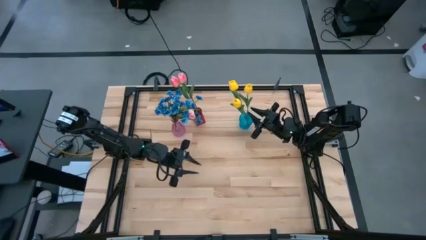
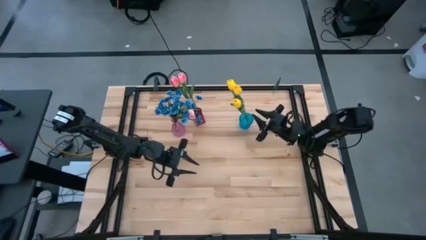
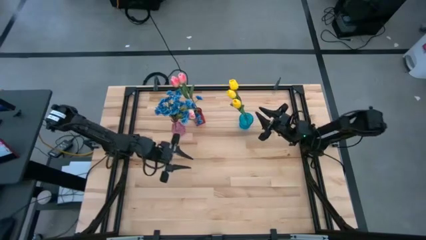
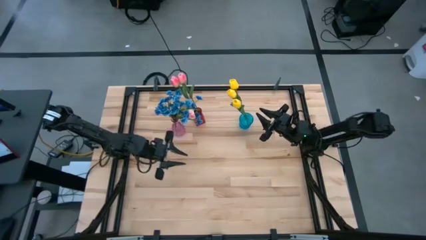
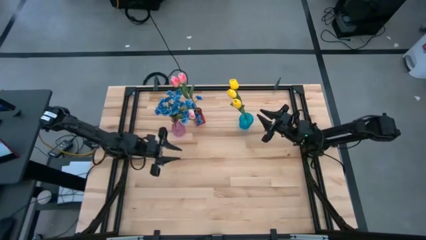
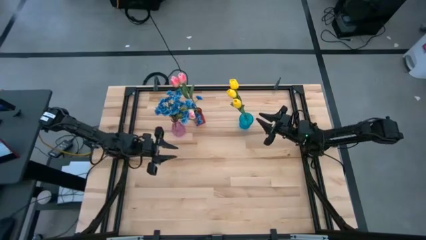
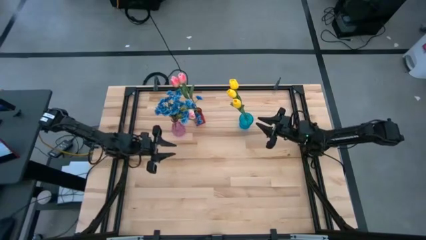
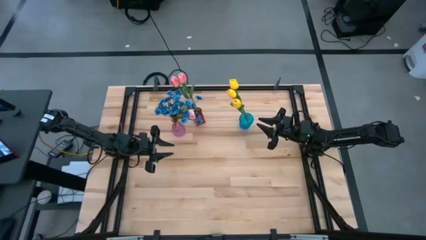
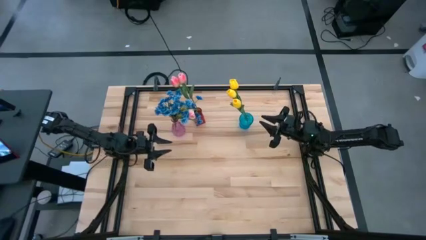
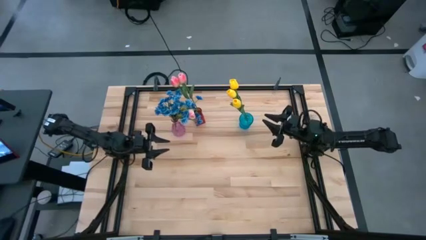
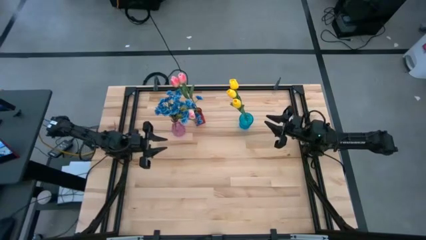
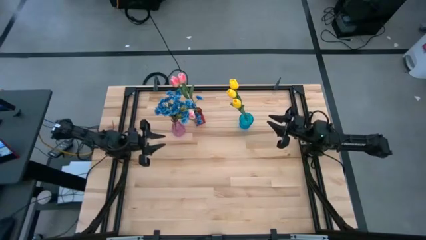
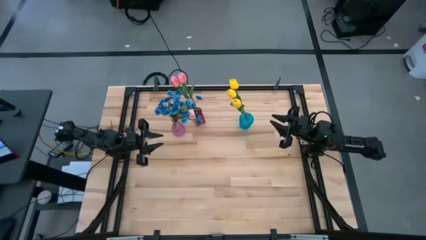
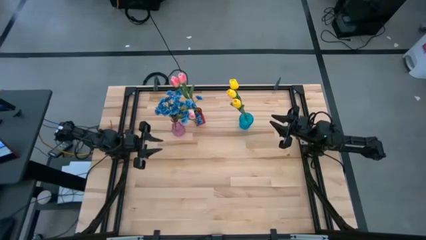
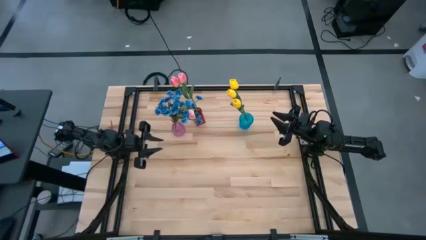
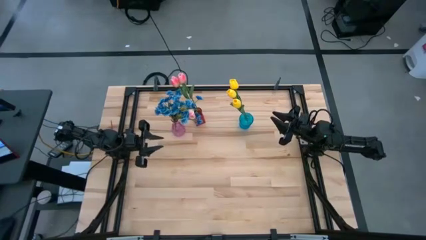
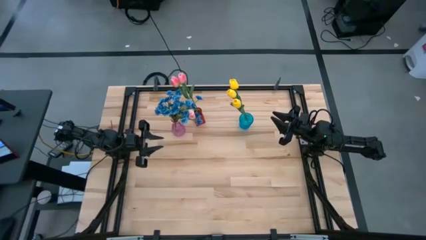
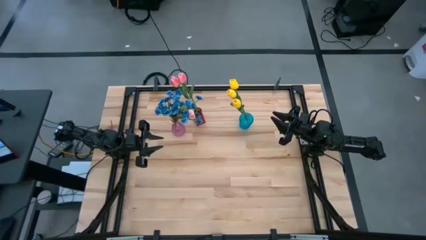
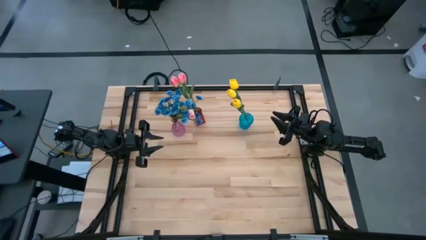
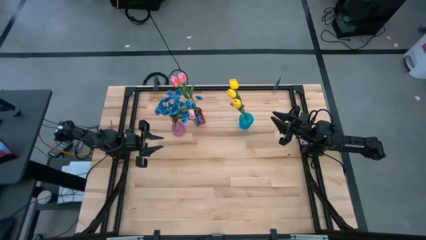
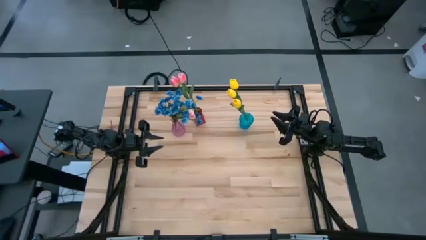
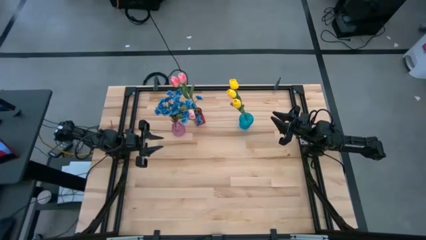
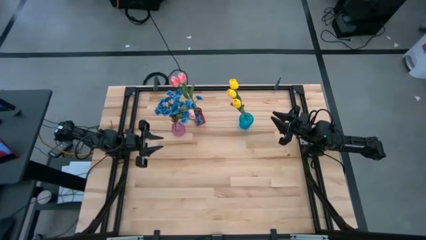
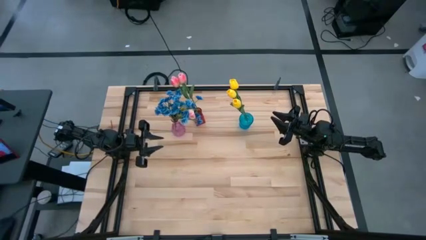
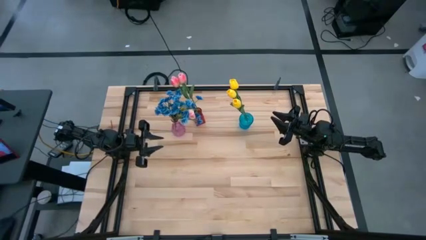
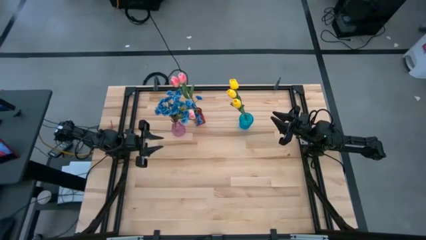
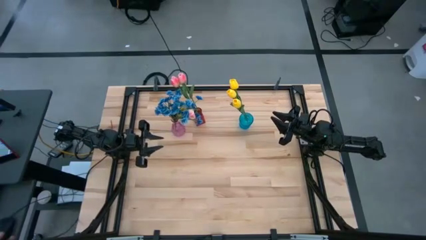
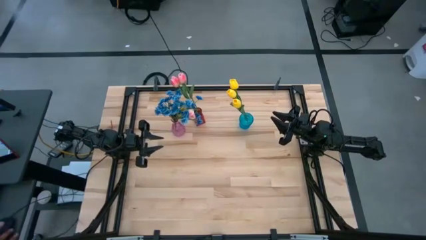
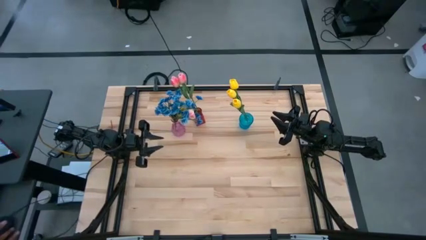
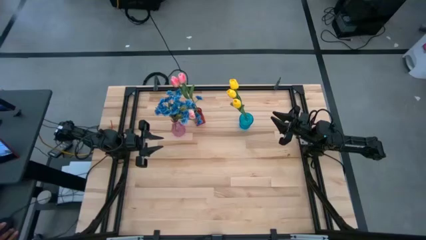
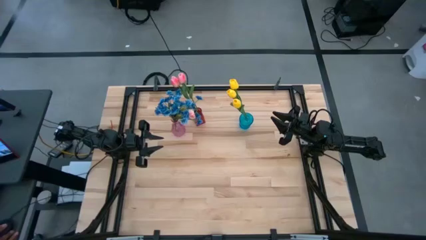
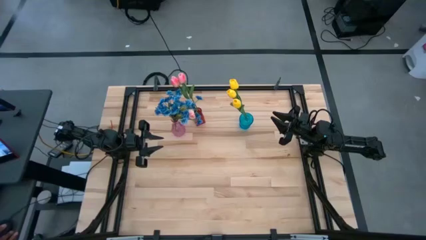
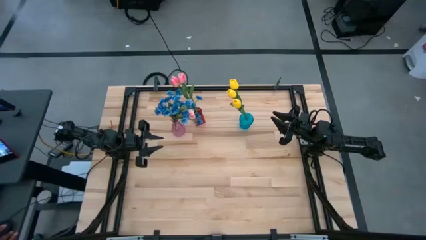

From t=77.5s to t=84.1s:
Task: Sort flowers into vase by color
Return to Home Position

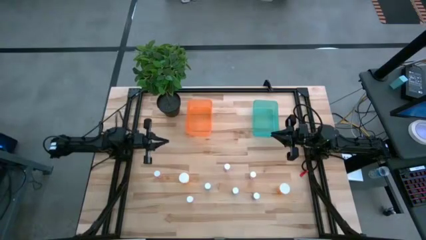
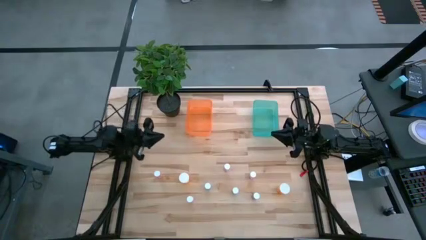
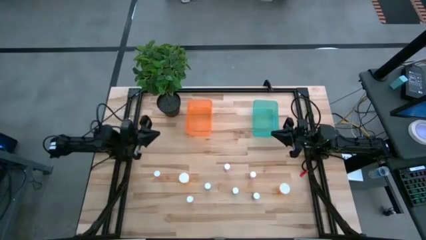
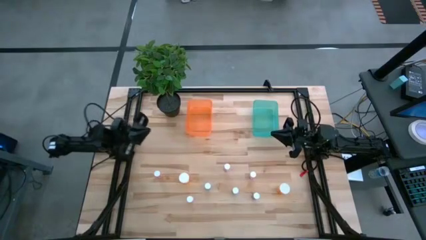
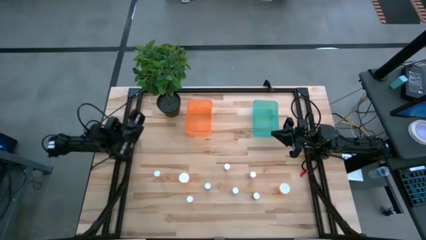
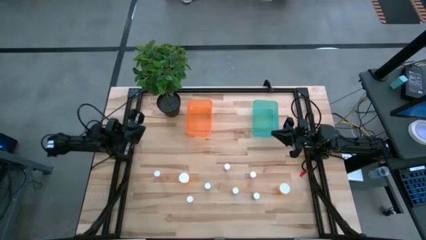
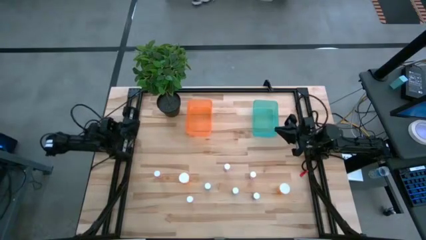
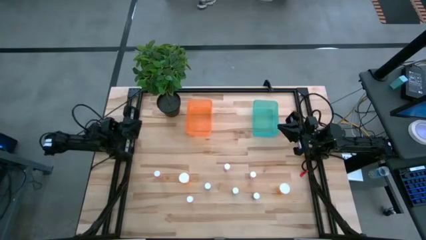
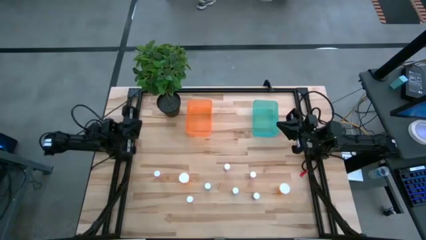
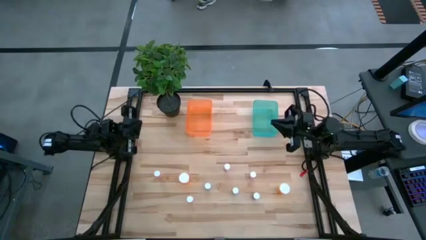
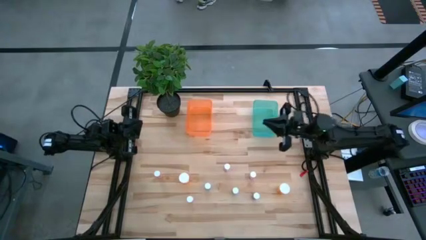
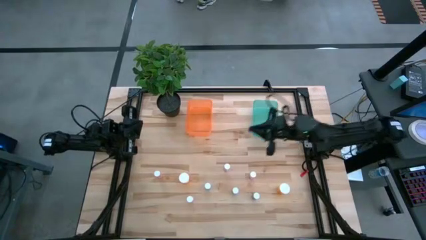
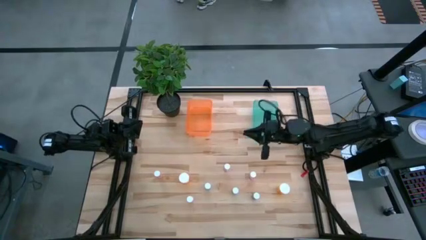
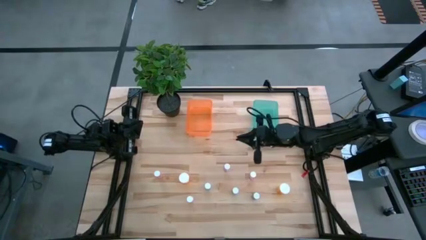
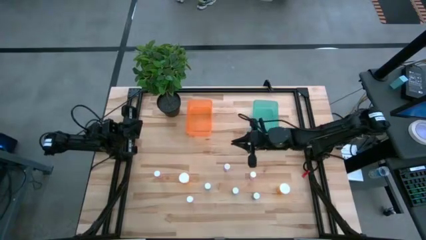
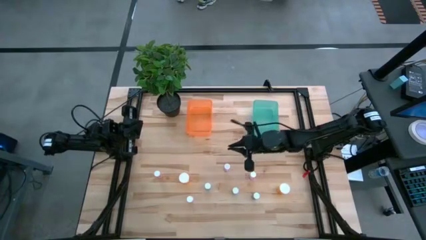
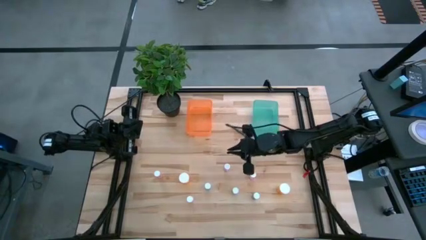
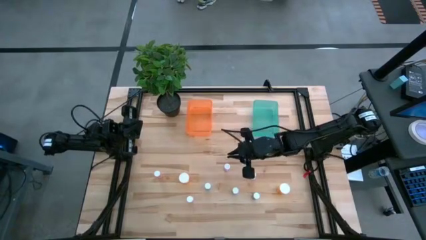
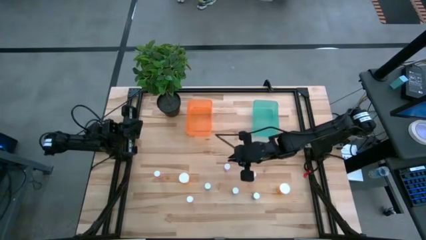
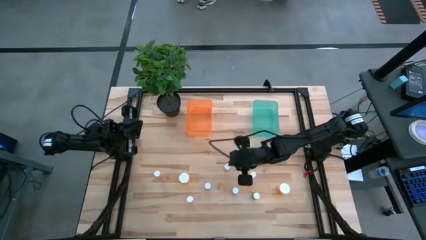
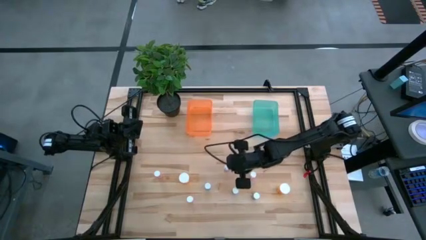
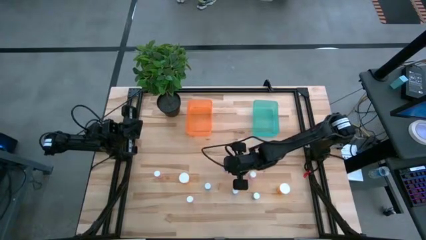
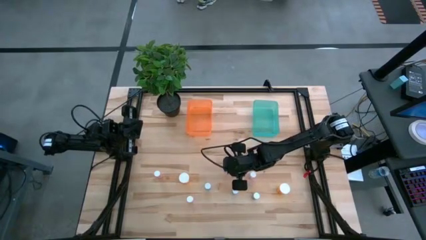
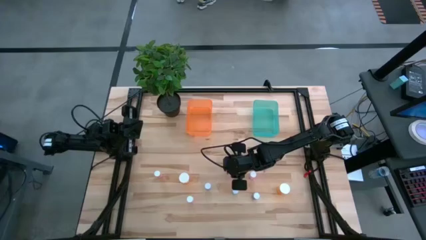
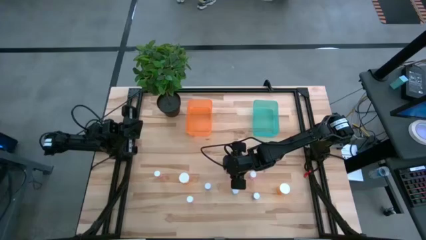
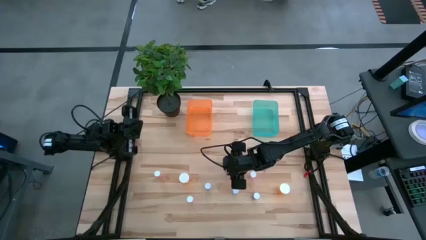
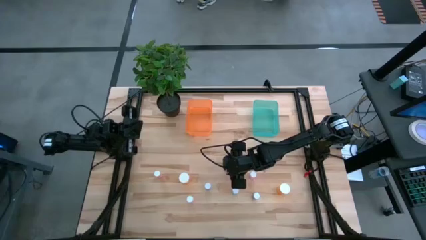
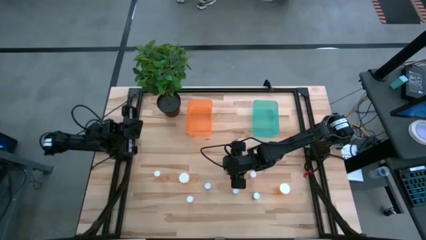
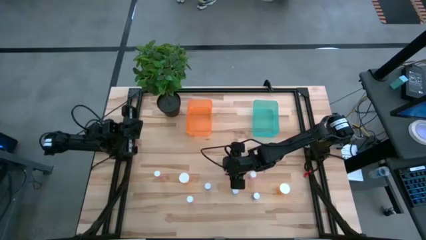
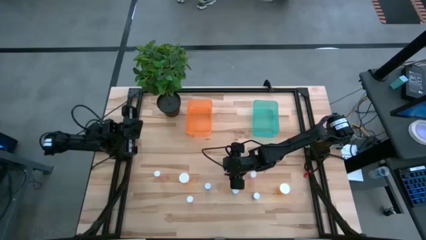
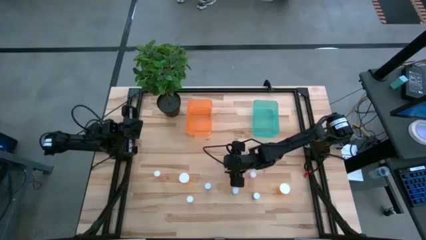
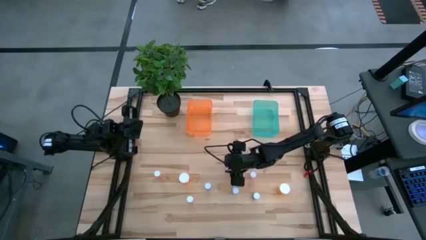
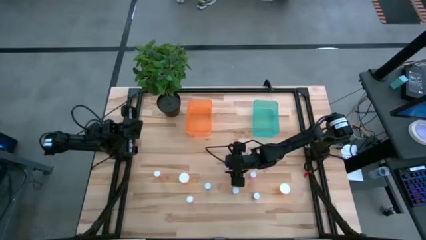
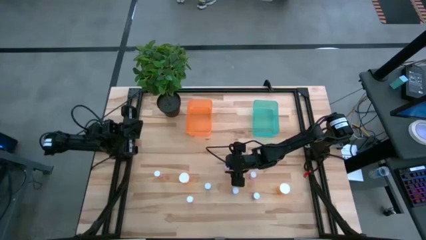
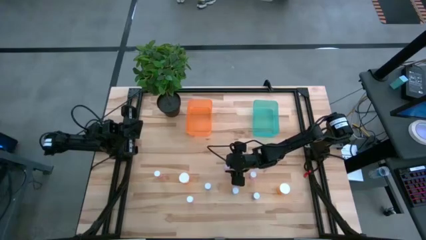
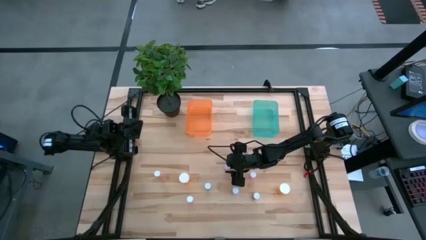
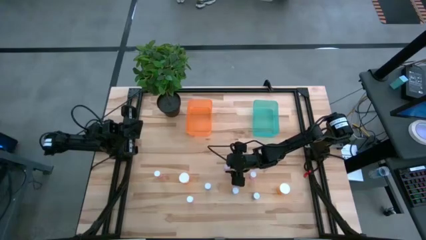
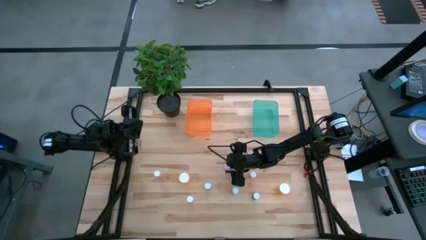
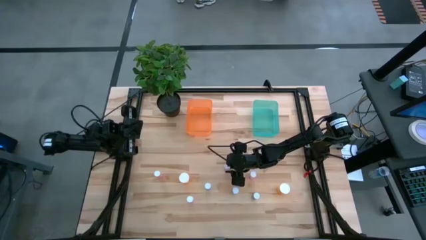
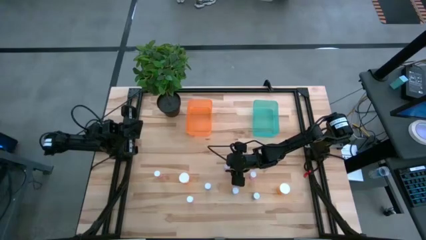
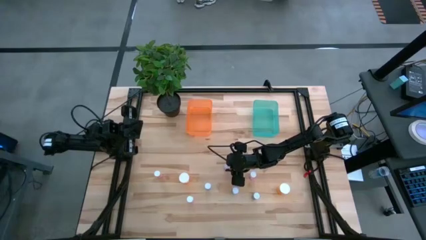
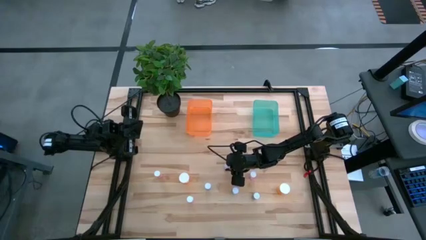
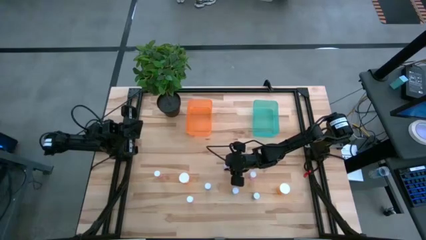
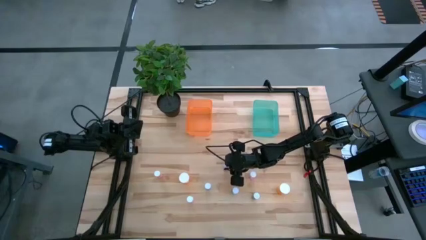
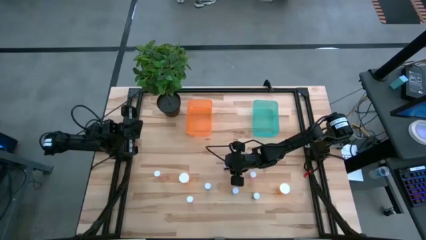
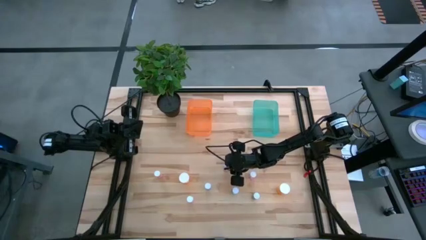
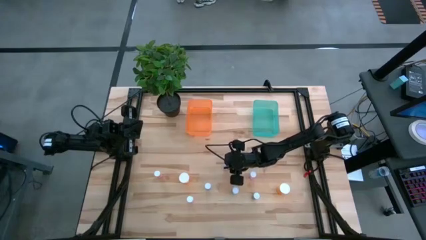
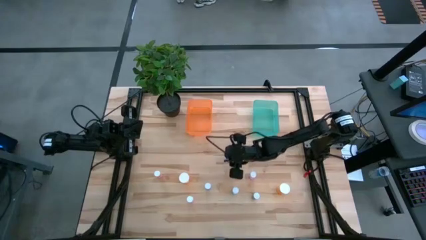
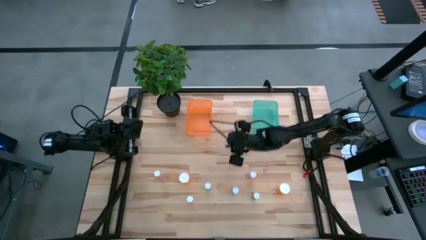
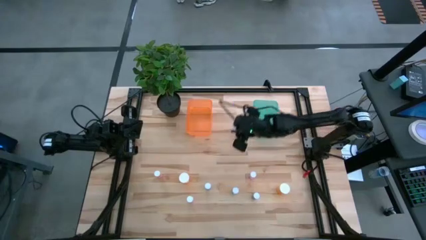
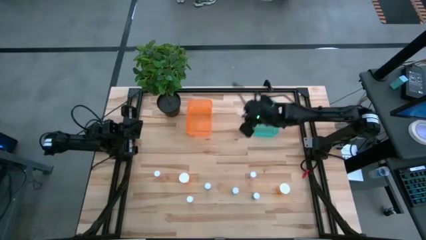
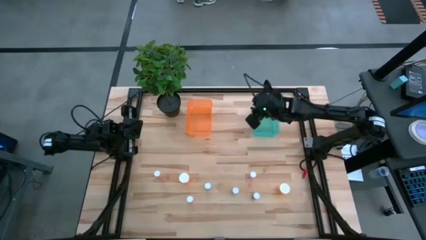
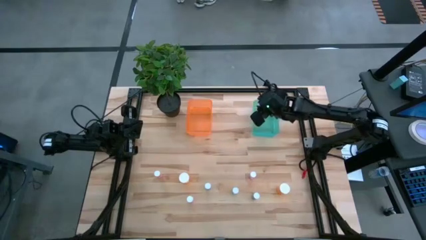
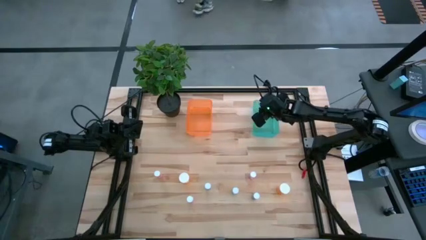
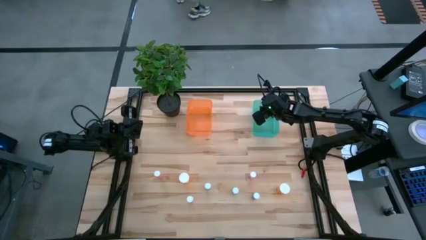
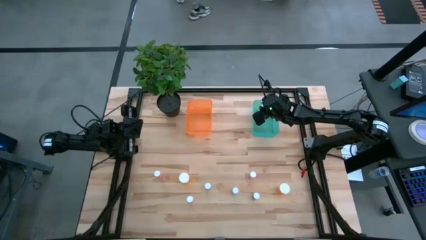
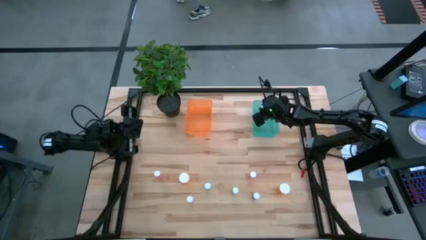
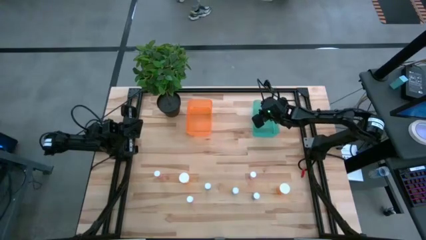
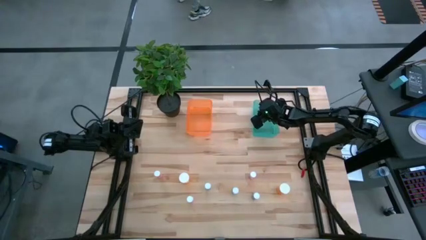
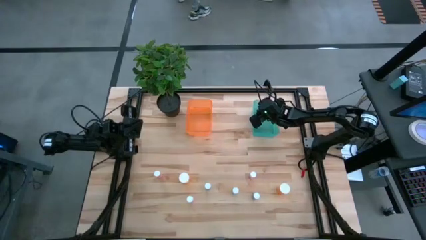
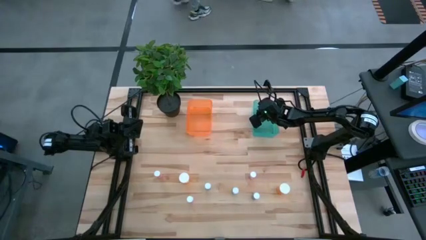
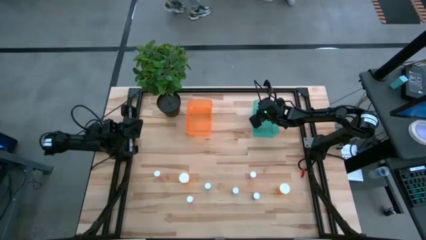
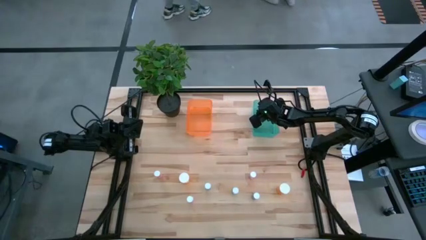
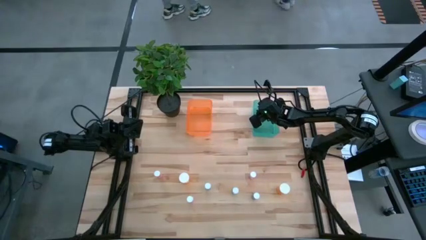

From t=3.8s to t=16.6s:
Task: Pick and place medicine bottles into bin by pill shape (circle, oval)
Put the top right pink tablet bottle into the green bin
